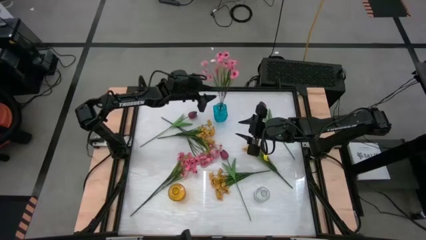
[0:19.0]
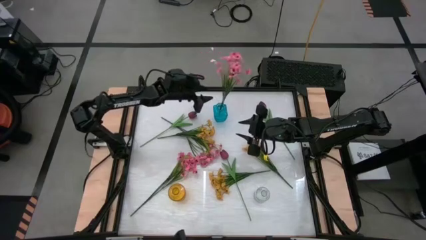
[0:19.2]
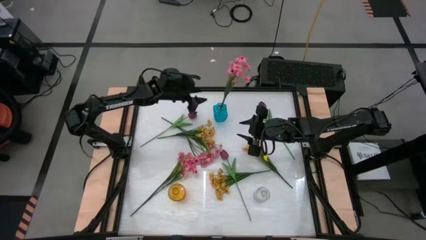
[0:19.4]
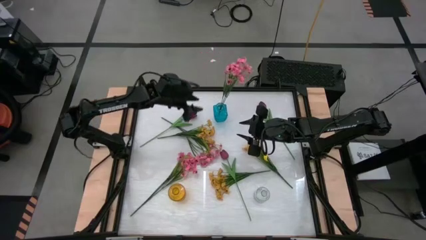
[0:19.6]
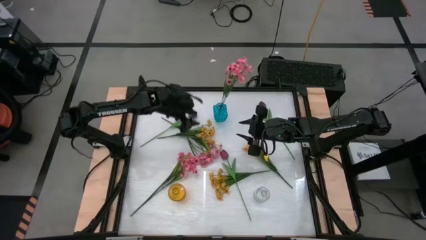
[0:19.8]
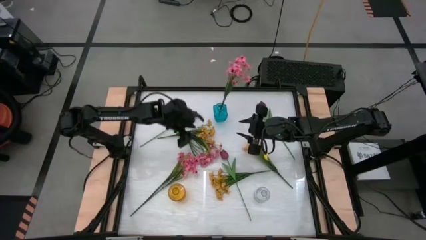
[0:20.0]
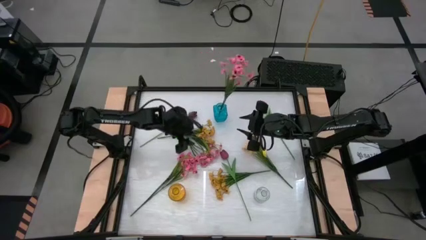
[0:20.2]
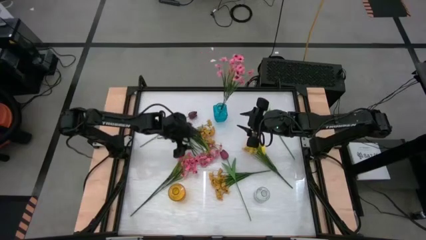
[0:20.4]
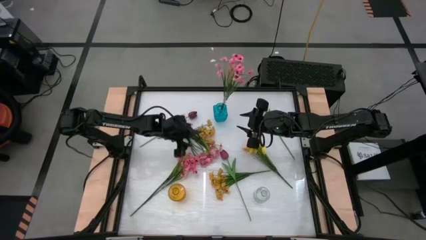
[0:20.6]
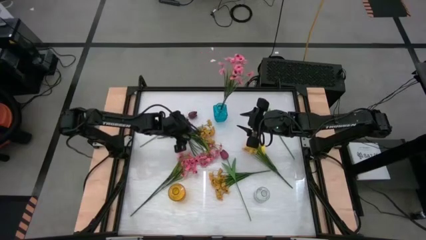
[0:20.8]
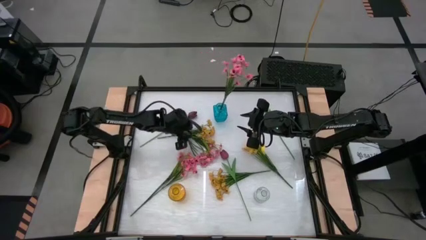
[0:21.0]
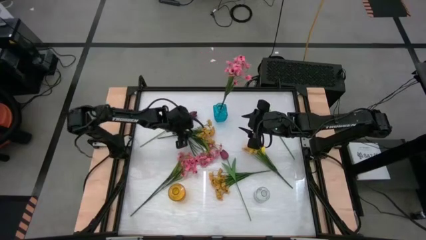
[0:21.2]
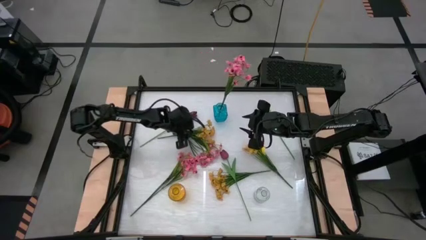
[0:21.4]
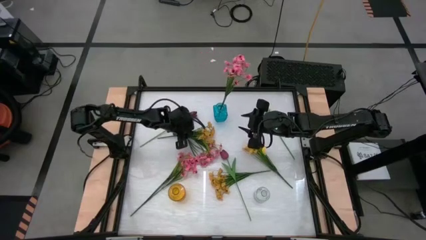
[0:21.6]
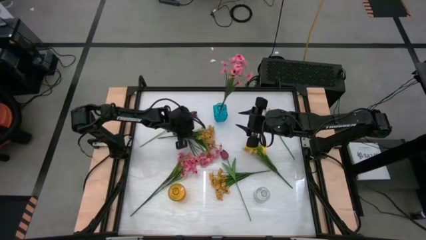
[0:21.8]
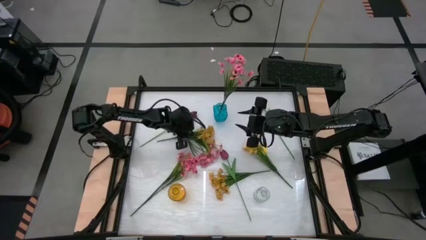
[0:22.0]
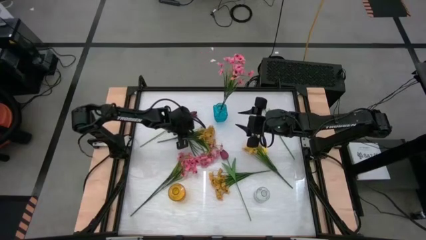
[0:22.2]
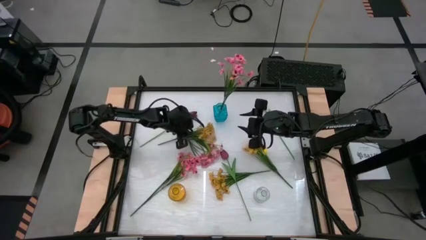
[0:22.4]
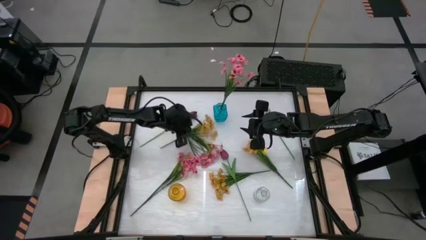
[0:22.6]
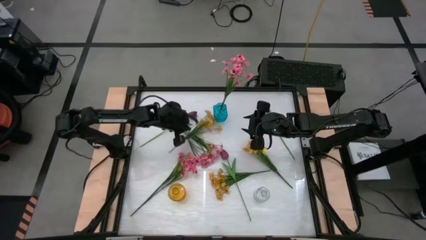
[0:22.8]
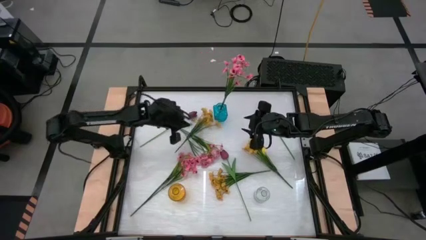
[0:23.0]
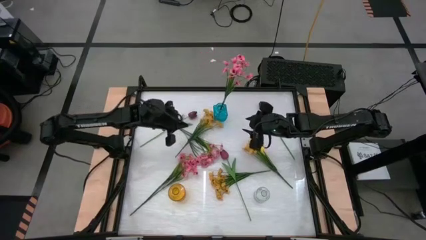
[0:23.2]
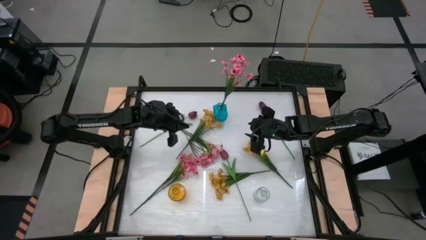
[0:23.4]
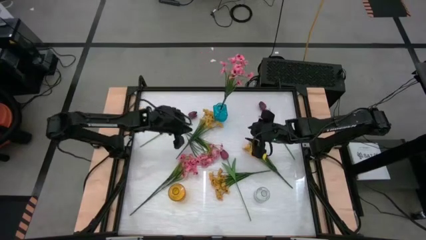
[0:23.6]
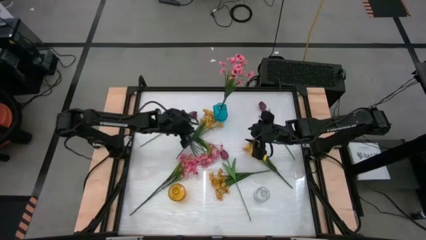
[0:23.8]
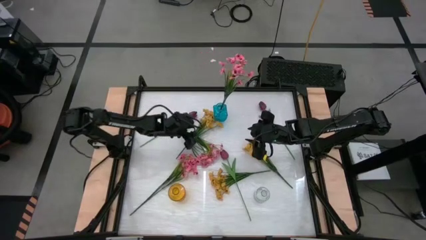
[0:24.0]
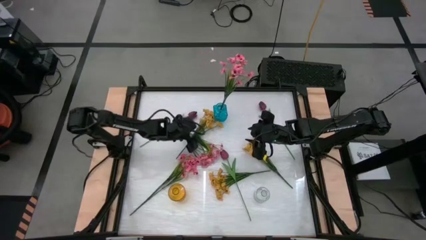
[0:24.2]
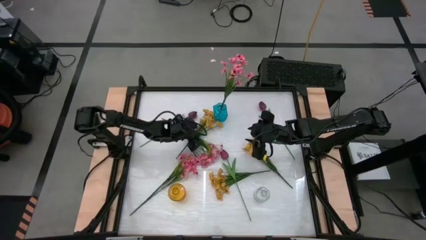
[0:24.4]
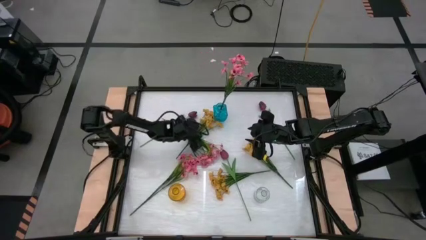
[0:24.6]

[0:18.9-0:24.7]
Task: Sort flowers into vase by color
Put the top yellow flowers into the transparent vase

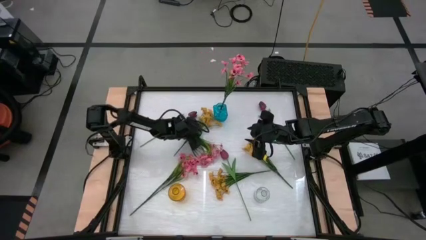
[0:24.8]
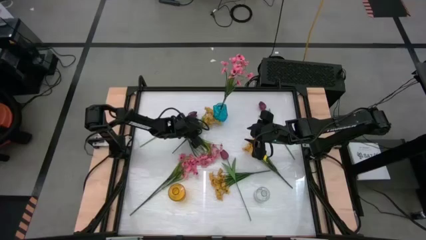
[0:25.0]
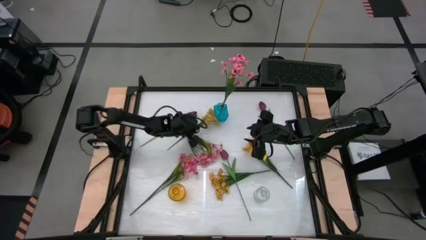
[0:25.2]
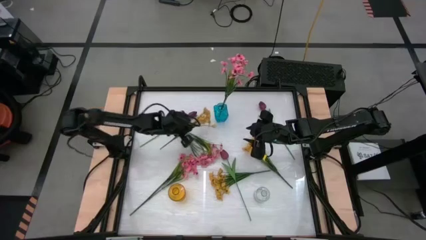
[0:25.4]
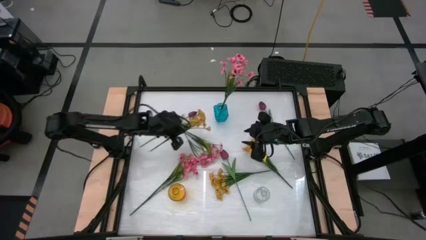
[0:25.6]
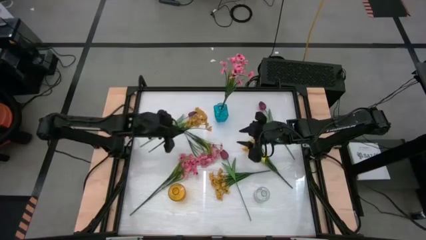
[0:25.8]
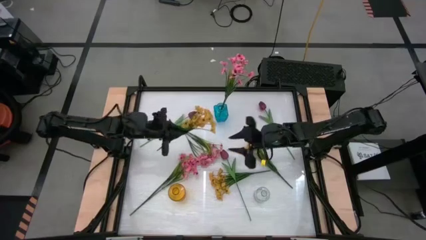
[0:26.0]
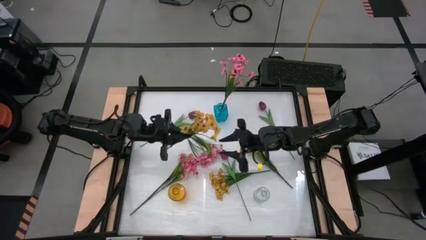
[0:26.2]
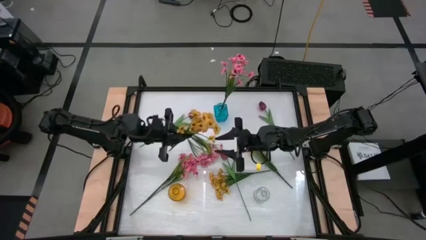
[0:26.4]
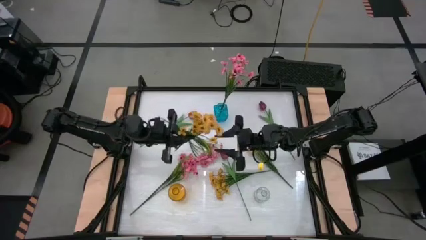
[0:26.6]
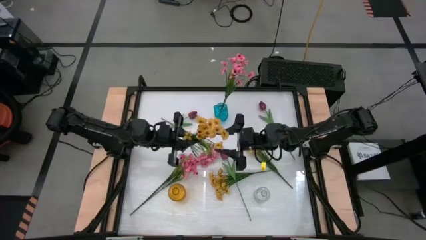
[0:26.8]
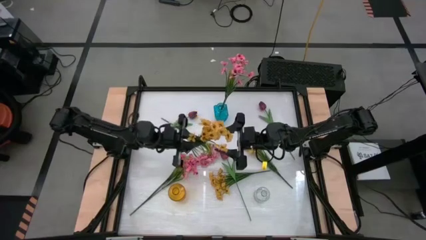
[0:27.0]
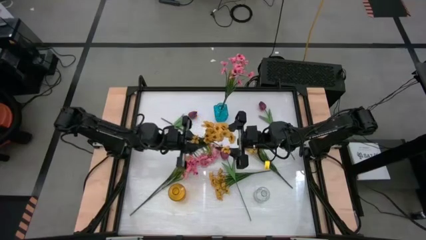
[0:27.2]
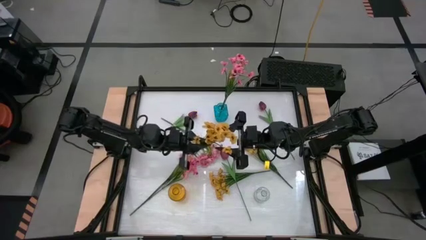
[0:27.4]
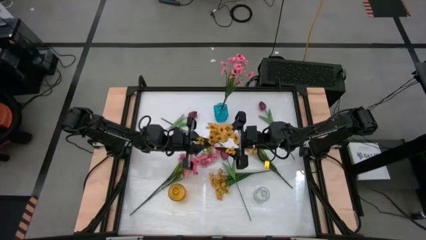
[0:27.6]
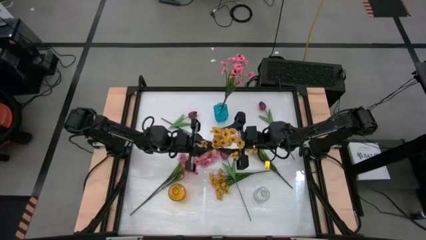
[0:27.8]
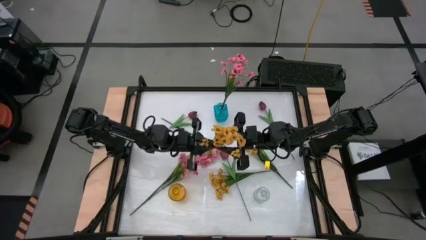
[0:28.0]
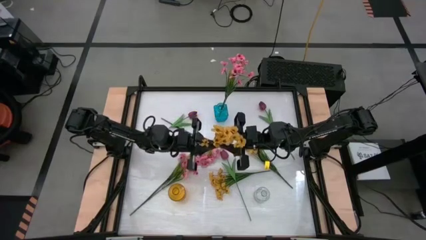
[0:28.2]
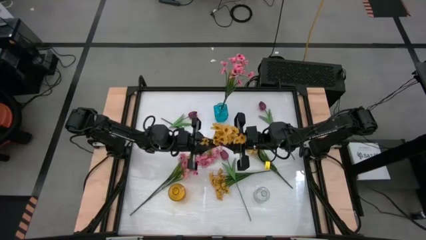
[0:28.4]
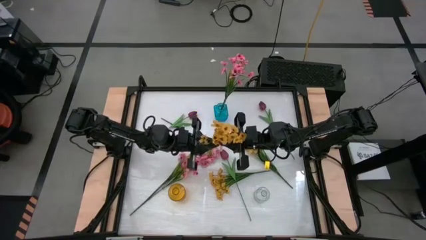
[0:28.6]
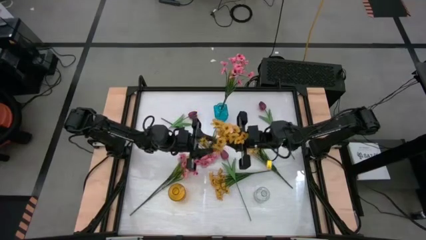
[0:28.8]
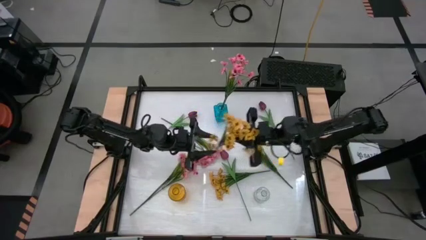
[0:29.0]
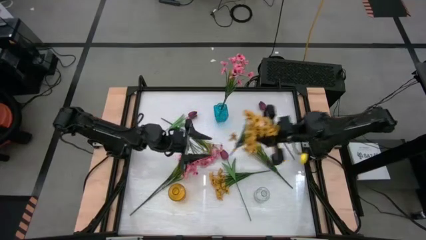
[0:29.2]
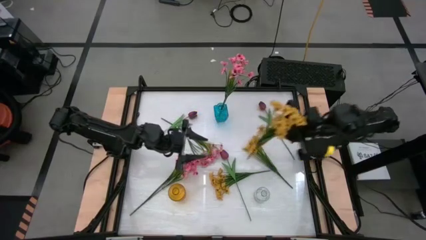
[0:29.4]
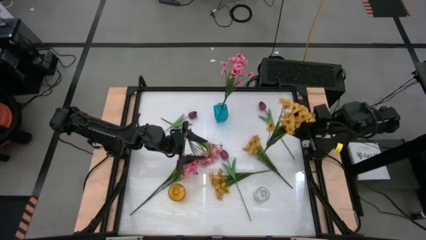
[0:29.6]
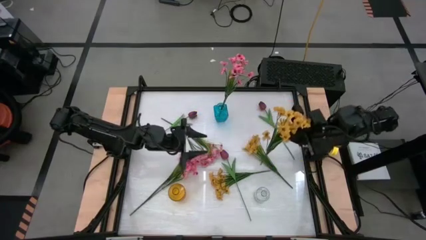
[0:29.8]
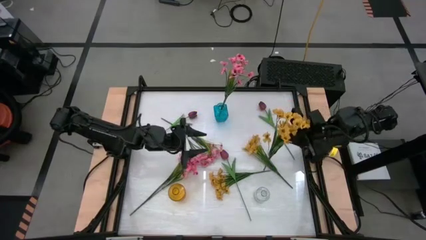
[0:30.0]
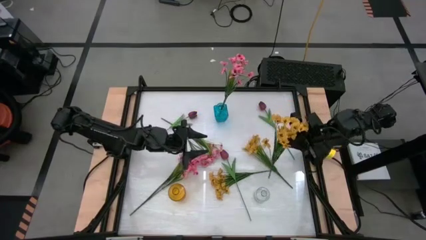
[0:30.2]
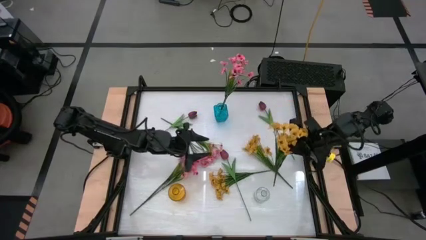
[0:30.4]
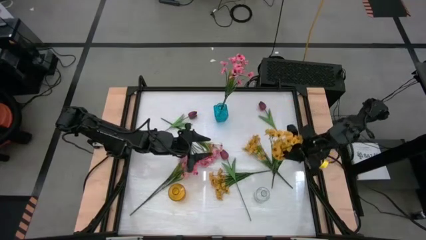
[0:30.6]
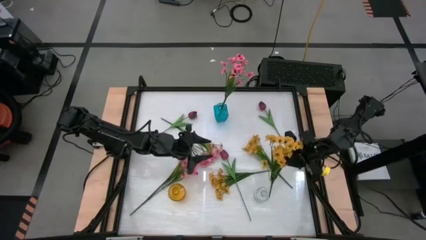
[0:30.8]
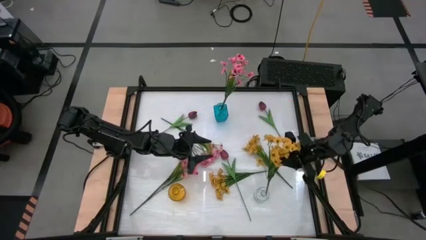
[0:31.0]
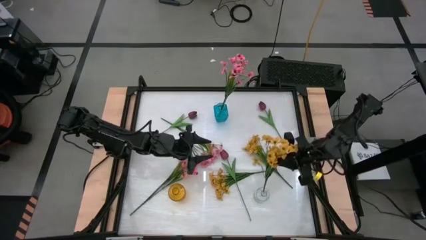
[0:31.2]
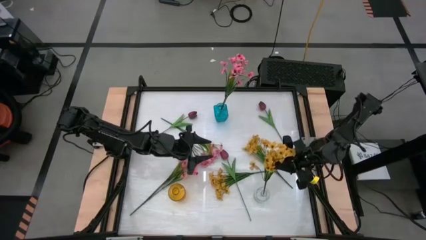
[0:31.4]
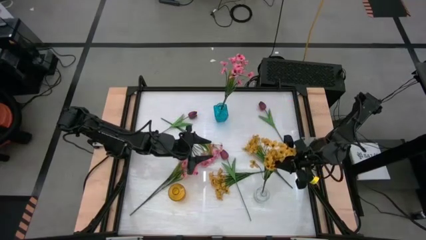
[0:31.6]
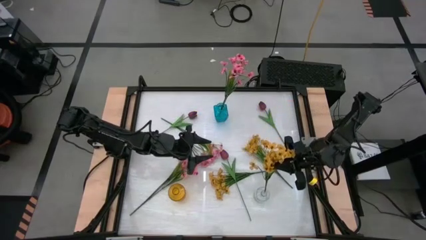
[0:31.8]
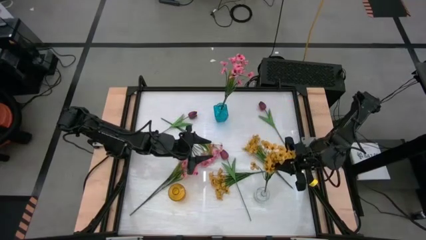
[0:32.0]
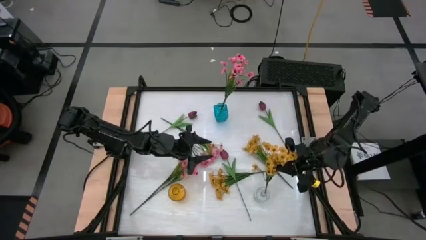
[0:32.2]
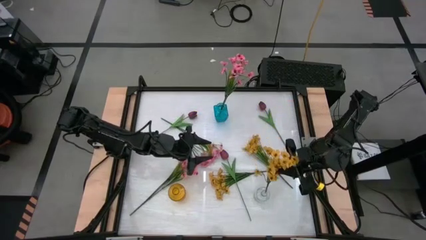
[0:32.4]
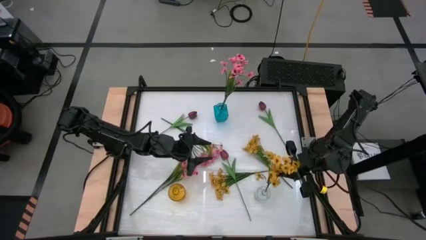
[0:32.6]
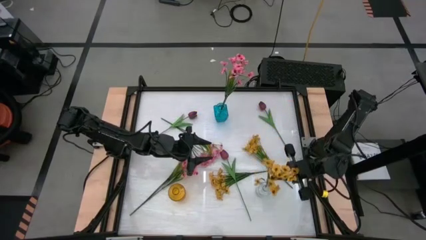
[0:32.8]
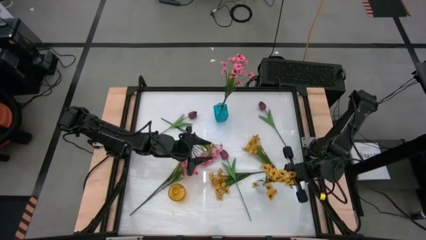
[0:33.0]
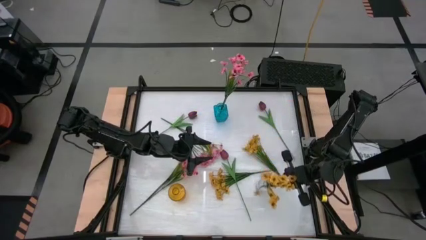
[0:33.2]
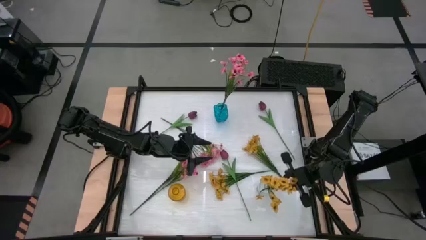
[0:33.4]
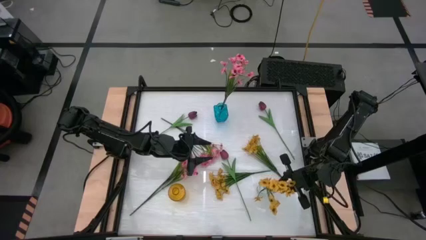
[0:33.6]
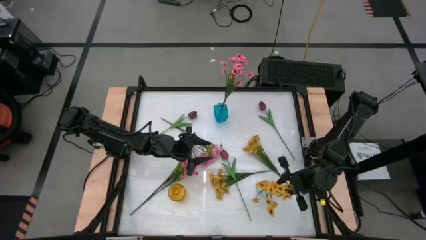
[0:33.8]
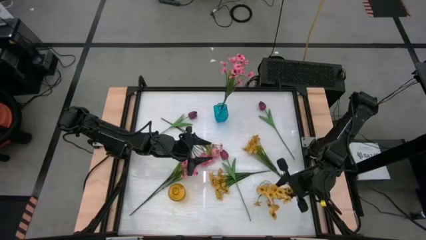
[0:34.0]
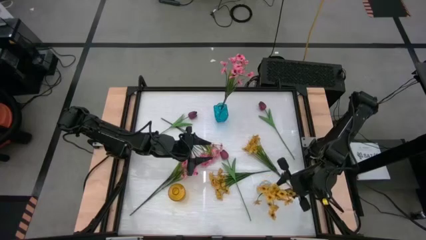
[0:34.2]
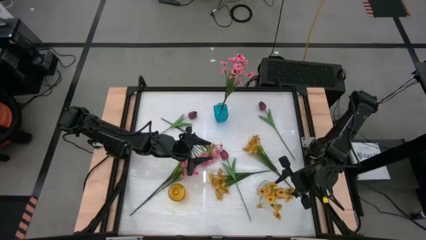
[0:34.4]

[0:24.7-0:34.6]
Put the top yellow flowers into the transparent vase
